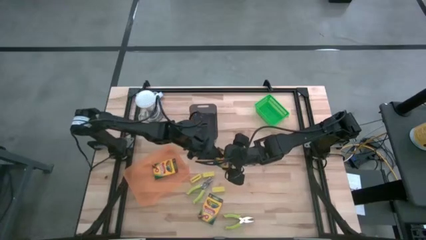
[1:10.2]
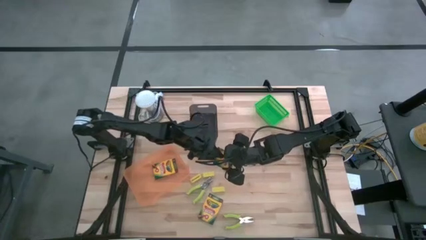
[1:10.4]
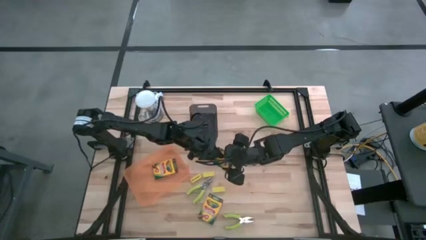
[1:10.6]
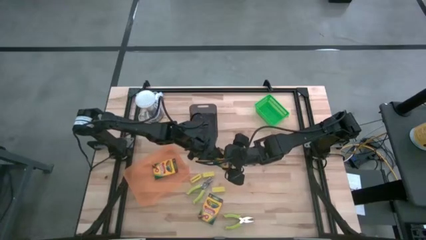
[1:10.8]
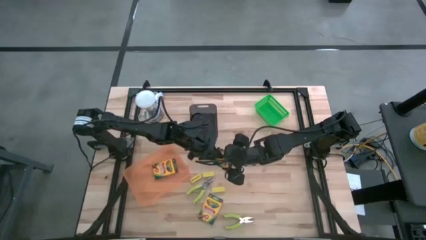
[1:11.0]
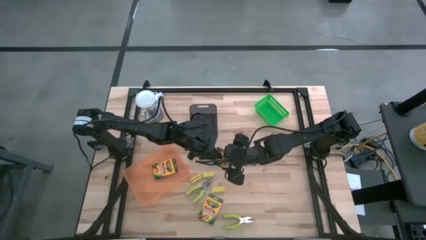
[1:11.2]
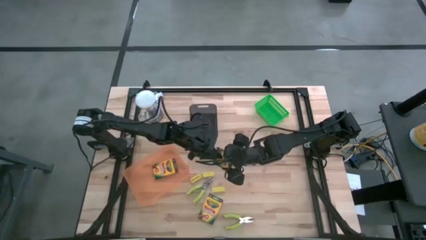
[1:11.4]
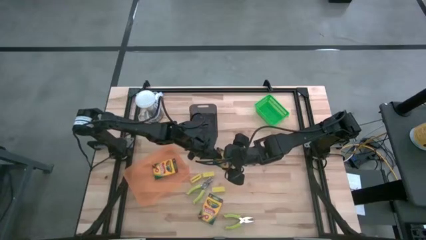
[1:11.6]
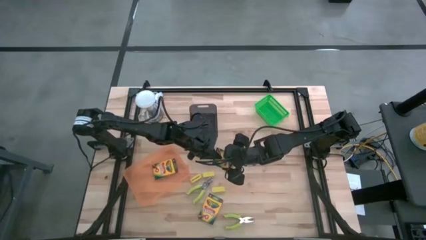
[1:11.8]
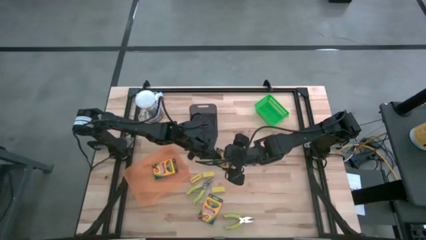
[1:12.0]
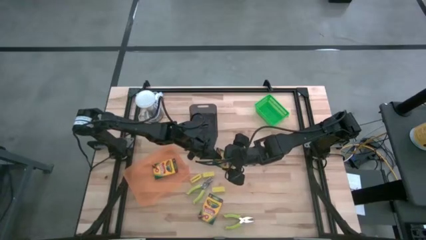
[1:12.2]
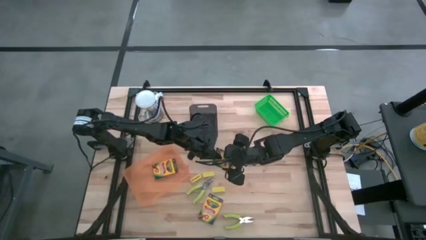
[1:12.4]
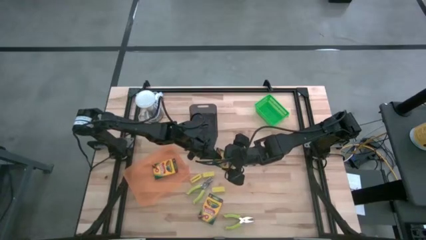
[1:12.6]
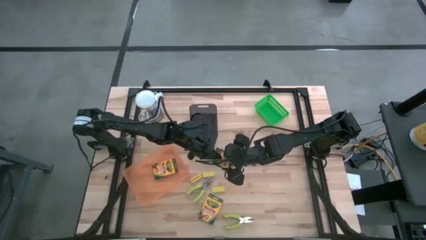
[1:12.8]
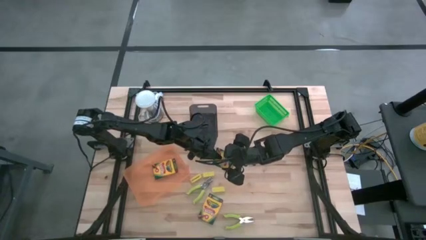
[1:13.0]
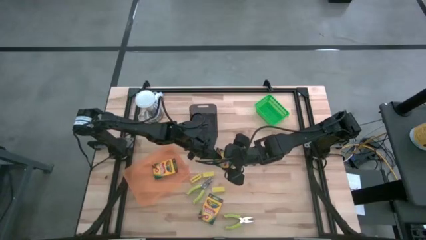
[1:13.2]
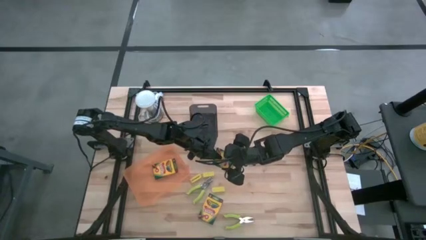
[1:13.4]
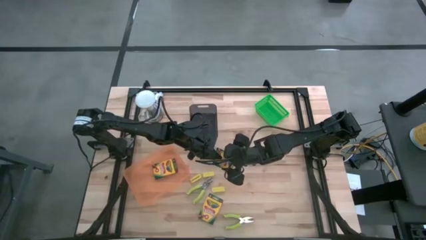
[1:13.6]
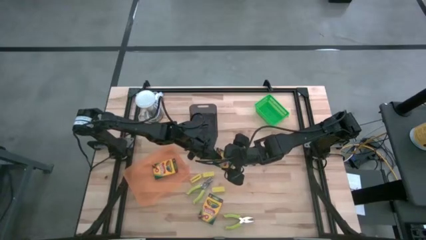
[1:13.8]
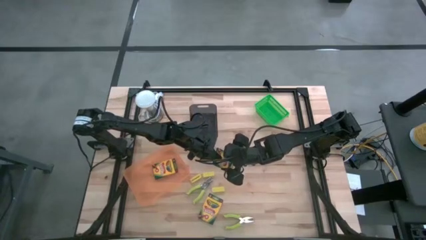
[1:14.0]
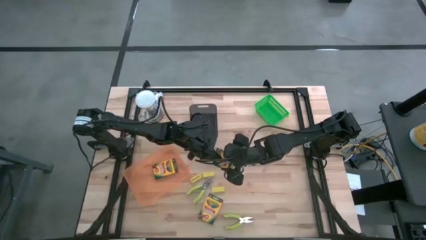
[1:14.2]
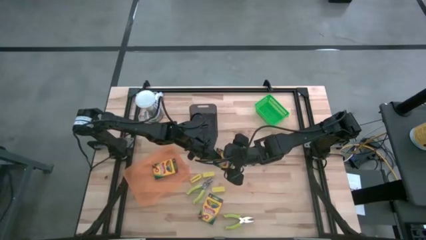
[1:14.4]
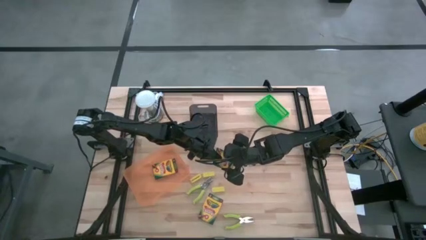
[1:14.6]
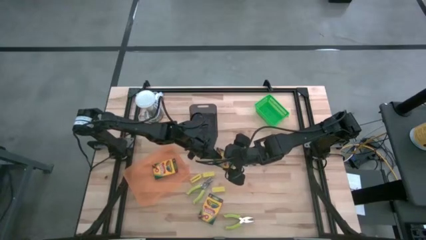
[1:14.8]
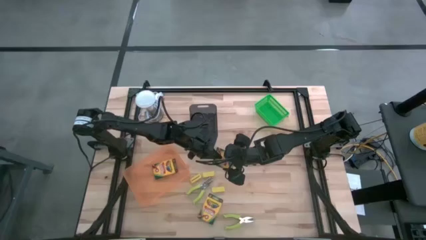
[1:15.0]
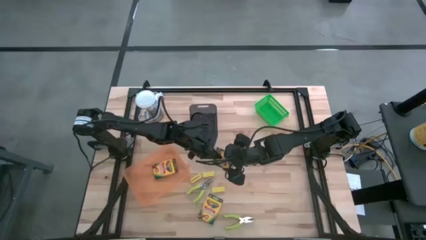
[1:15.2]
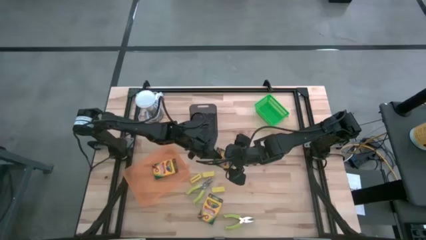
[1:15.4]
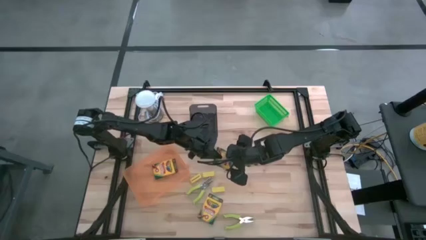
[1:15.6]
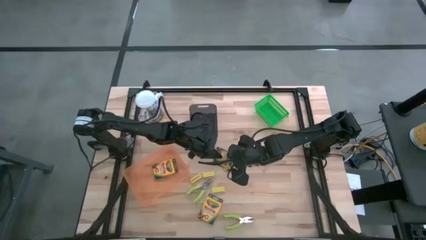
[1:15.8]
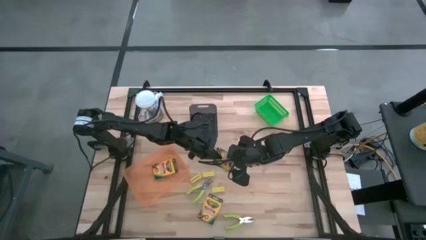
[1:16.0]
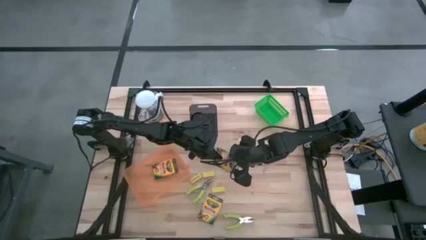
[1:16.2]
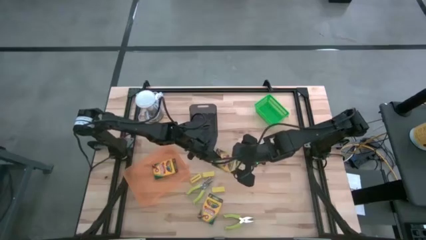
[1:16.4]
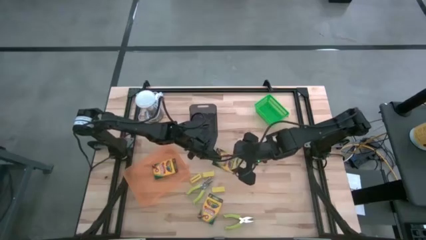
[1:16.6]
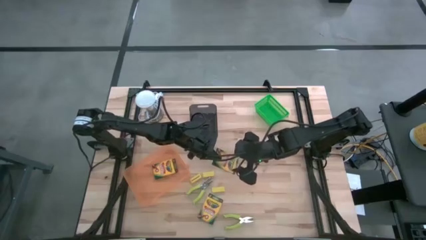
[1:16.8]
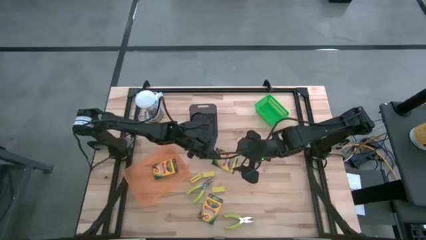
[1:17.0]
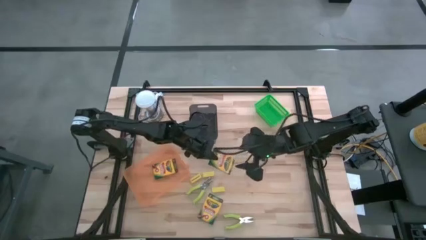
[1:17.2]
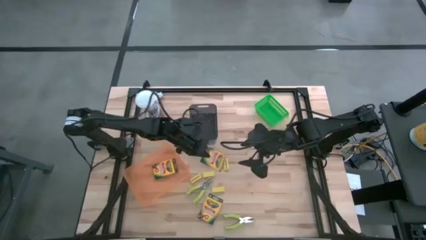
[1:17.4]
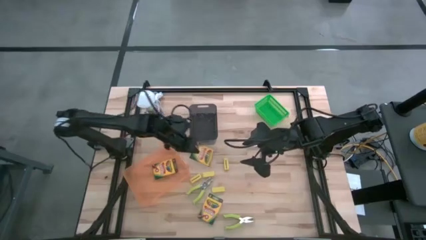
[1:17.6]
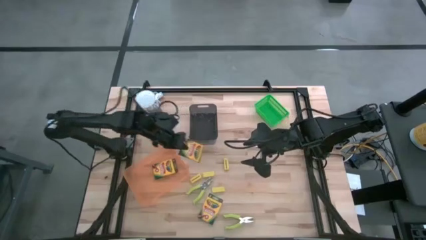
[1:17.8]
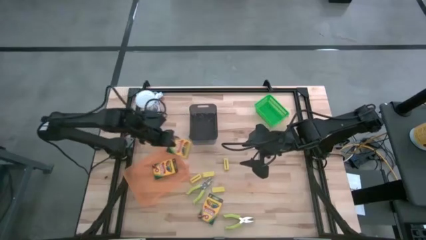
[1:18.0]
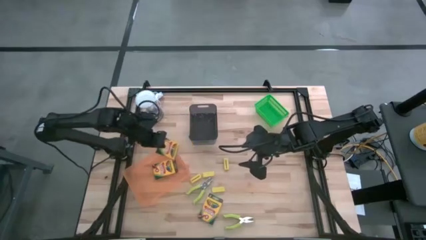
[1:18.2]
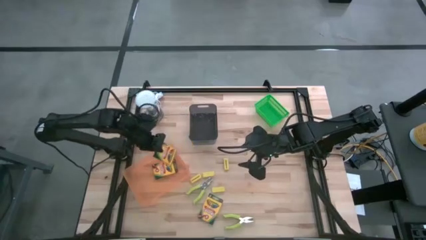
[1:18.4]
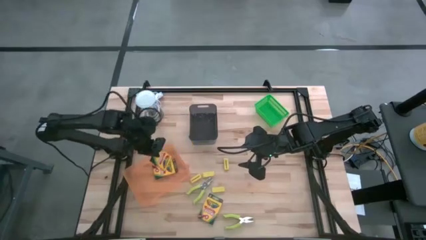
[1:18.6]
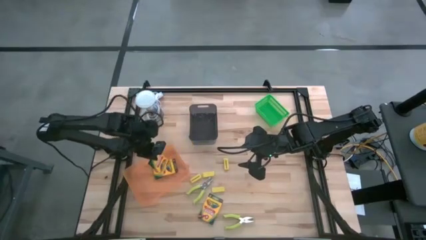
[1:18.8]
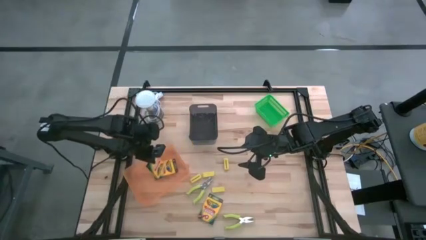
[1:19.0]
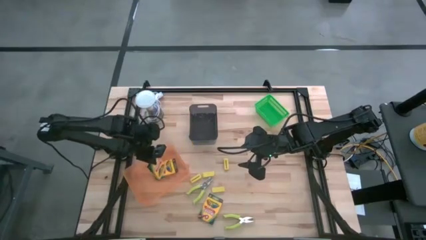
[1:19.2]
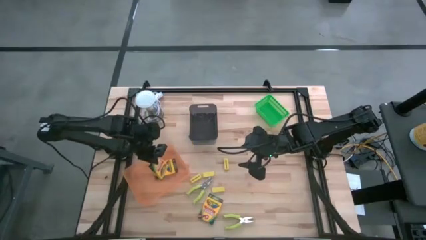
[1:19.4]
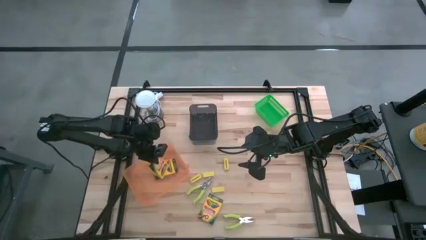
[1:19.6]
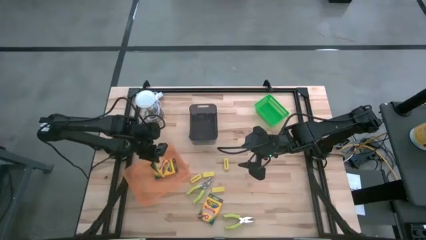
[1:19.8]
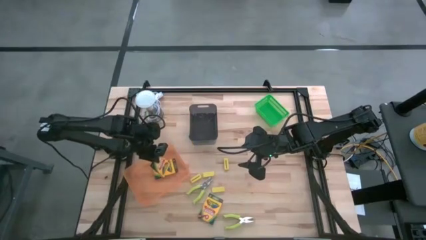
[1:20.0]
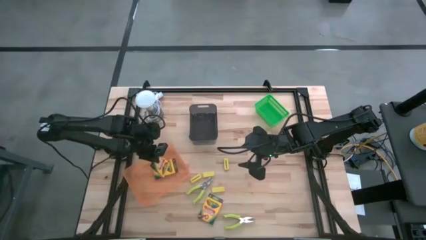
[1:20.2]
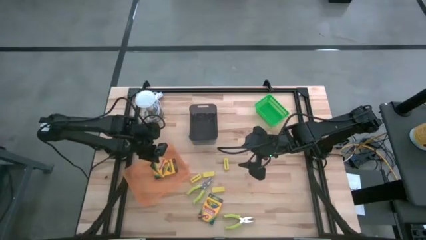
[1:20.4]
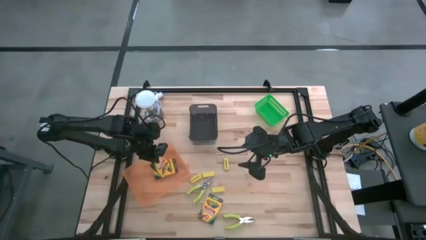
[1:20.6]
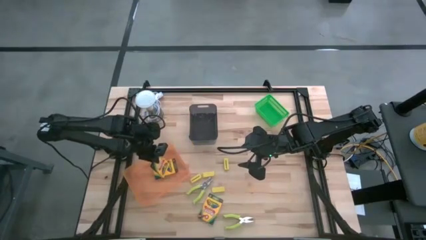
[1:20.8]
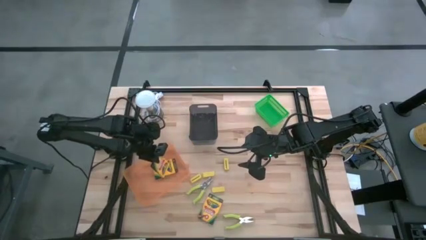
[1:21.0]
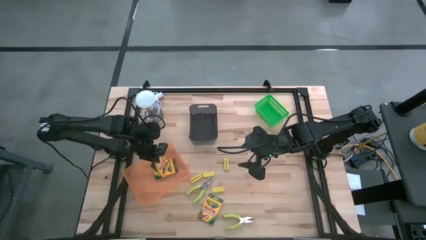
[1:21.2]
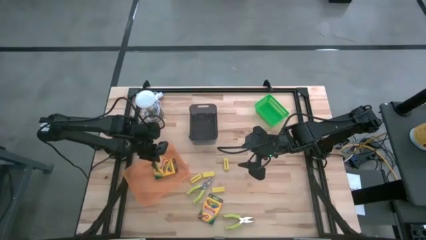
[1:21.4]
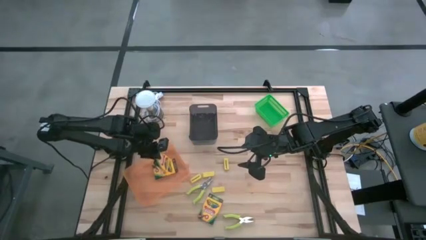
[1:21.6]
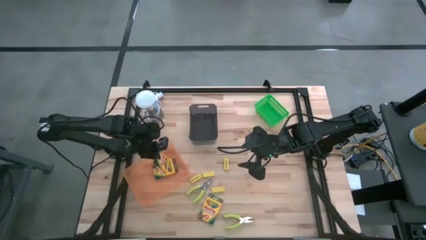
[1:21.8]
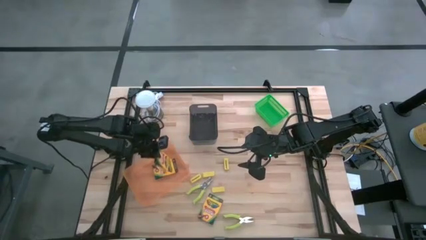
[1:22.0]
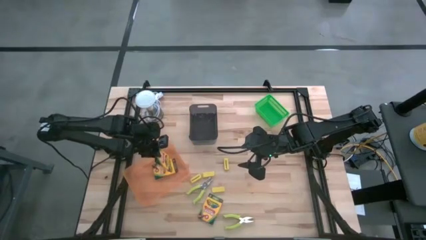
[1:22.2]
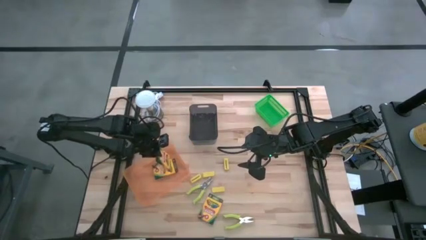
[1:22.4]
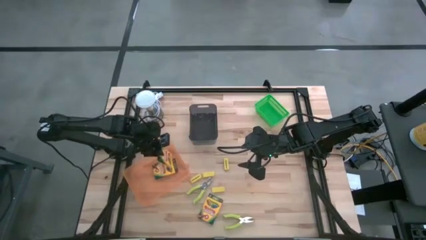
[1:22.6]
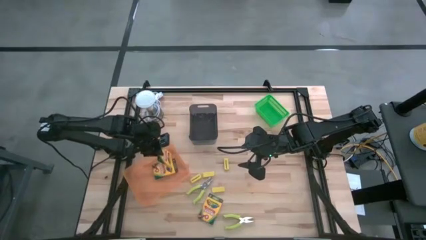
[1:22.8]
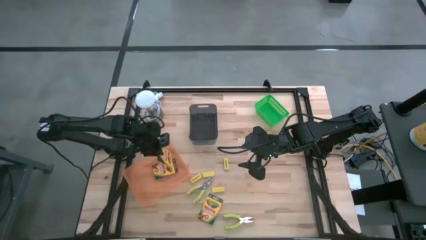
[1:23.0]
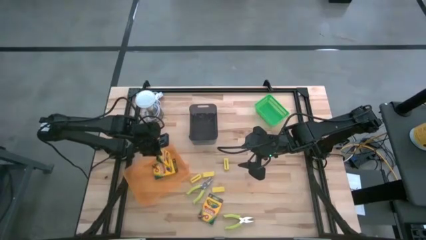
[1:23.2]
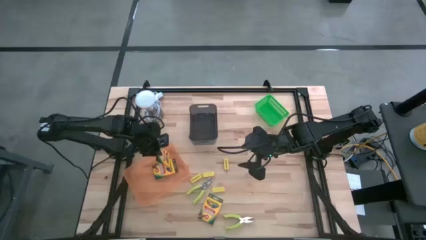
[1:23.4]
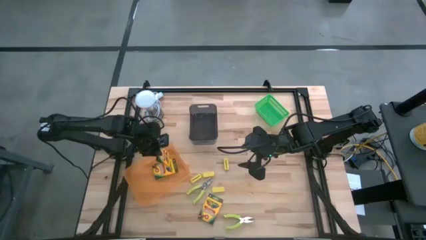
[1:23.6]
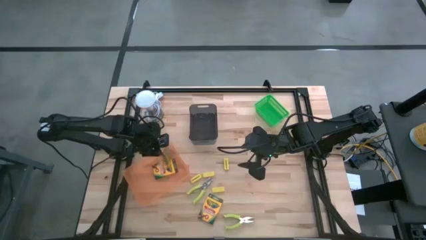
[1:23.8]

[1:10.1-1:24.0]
Task: Pick & Place School Supplies
Put the pack of crayons into the orange bin
